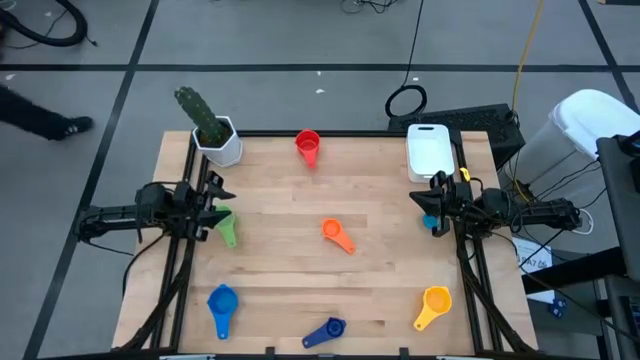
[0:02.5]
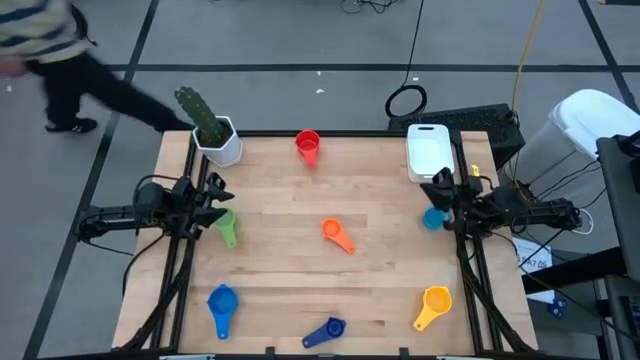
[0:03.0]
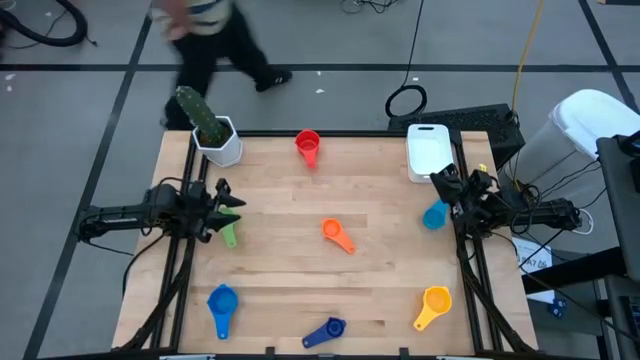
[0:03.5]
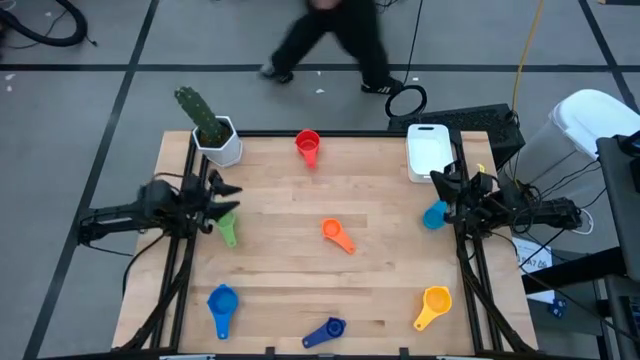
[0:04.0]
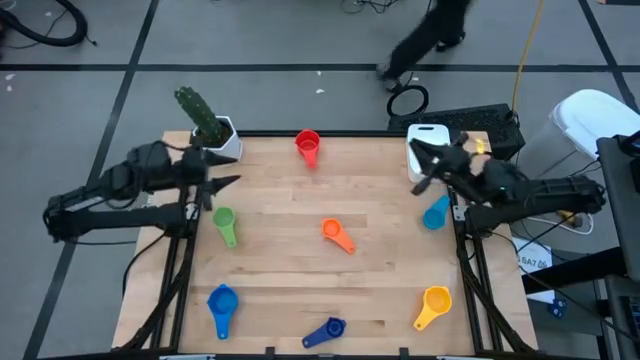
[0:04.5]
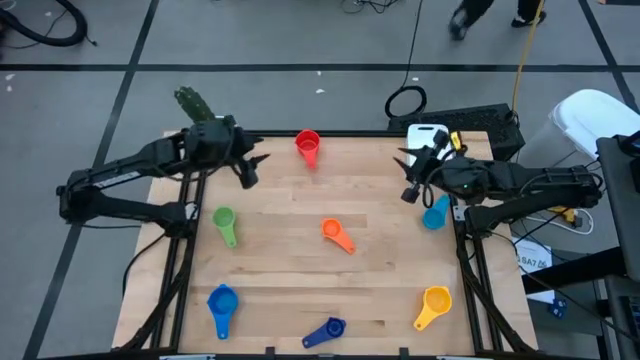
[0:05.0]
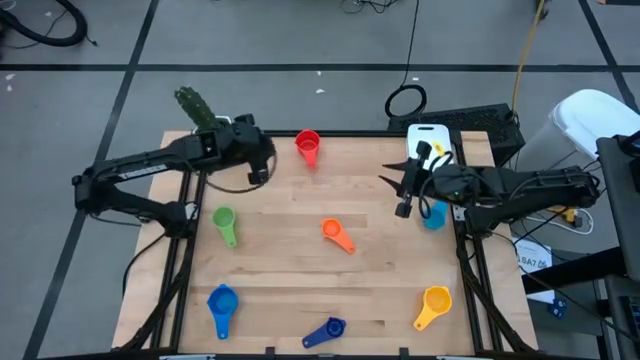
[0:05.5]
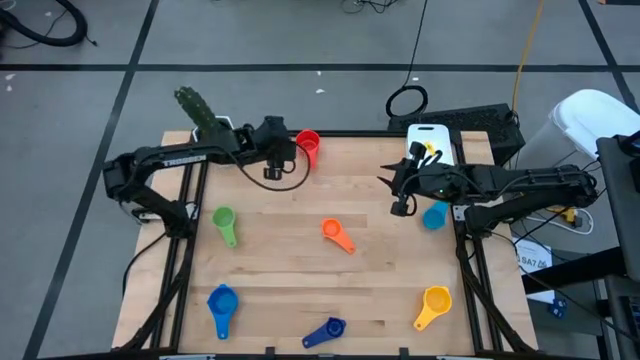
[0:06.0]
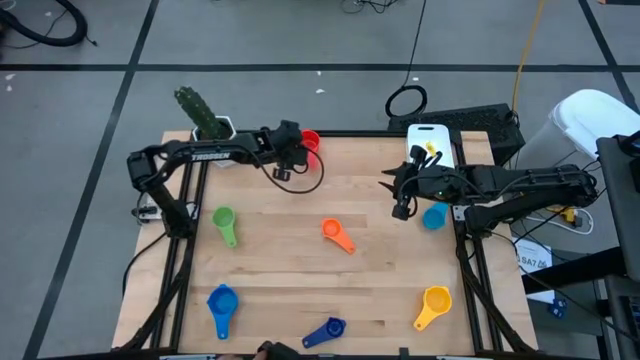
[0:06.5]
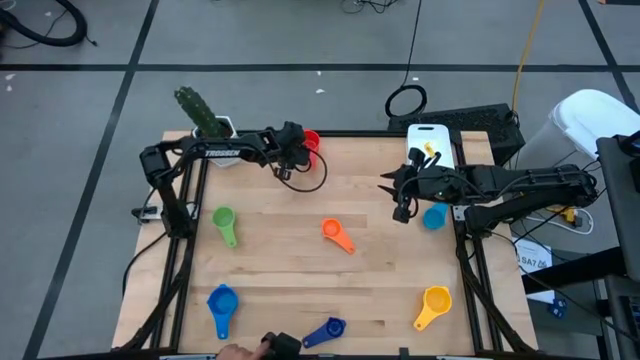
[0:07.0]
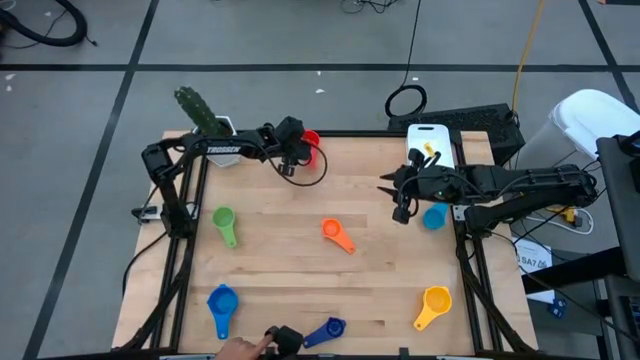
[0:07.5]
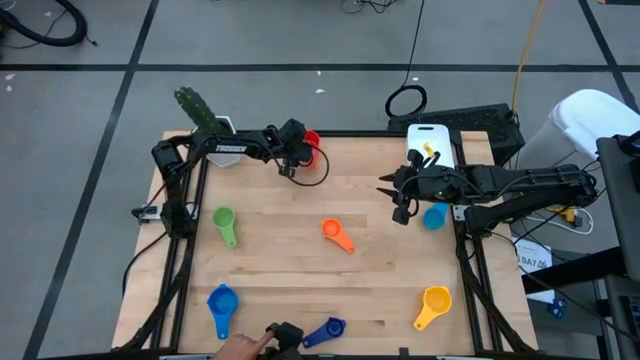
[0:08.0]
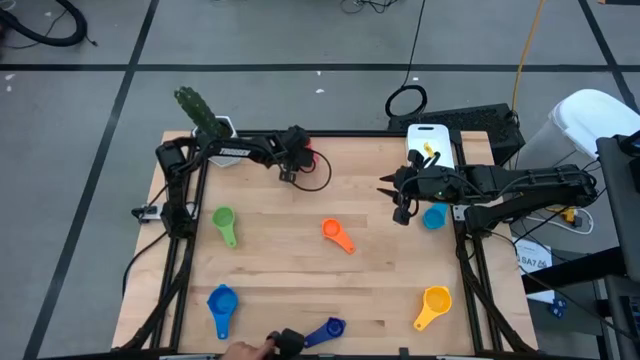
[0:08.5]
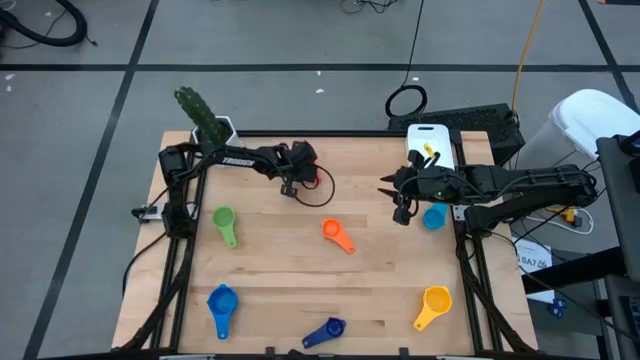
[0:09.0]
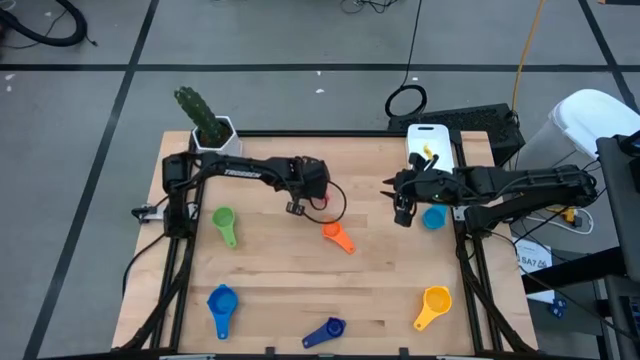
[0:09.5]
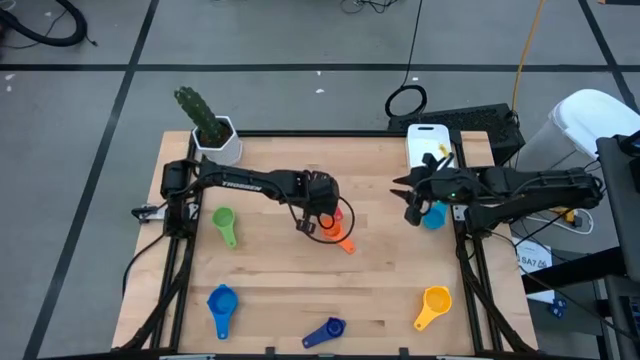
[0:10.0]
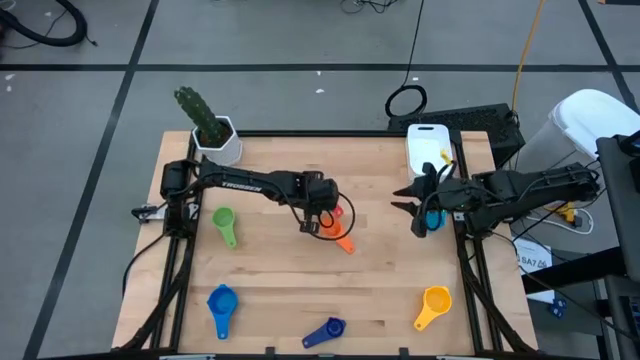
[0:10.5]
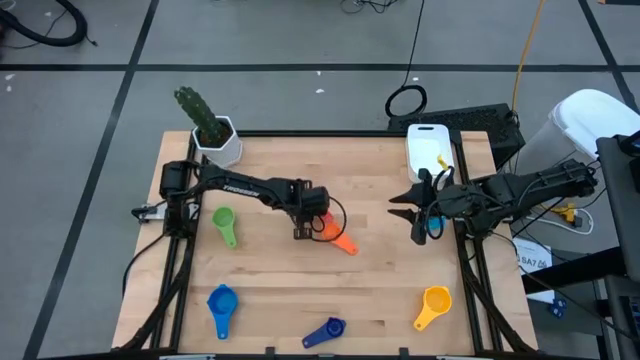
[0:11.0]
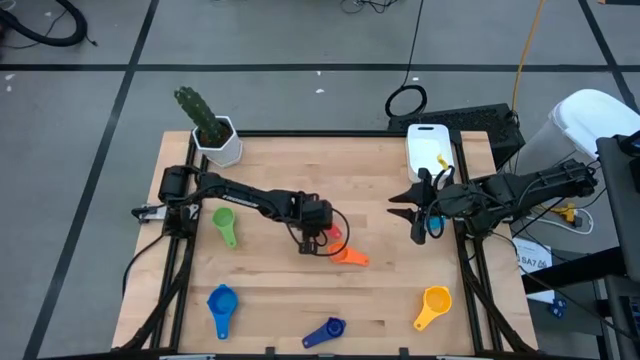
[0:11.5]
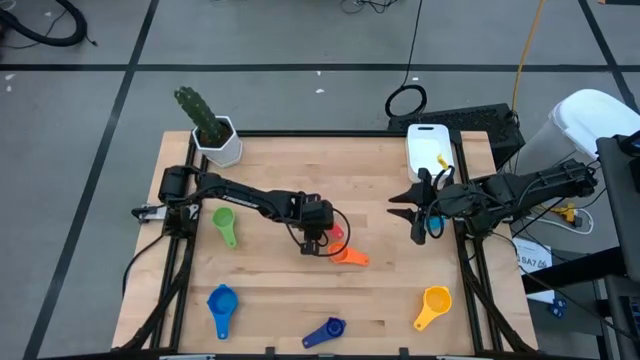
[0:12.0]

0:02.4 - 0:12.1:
Task: Nest measuring cups in basket
Move the red measuring cup to the center of the table

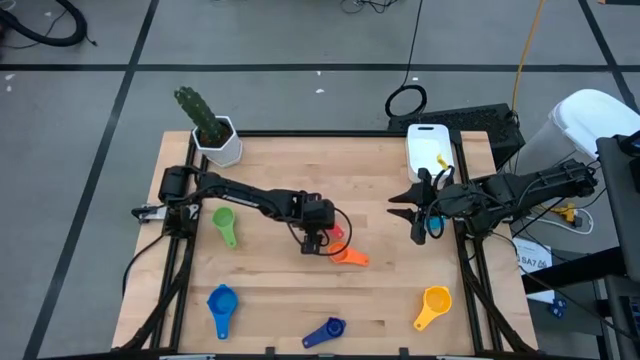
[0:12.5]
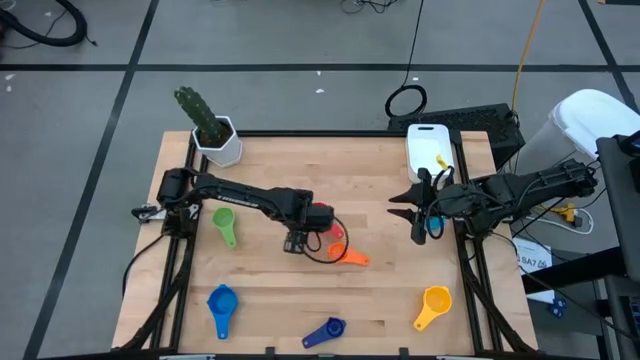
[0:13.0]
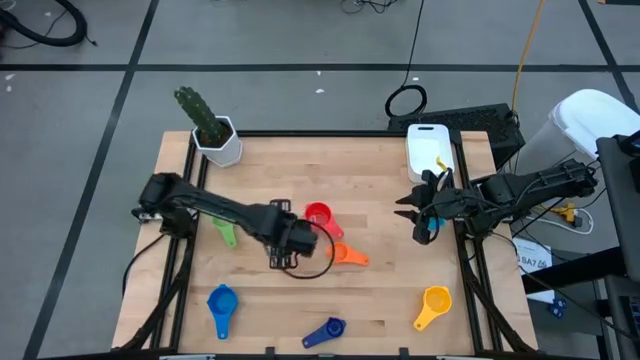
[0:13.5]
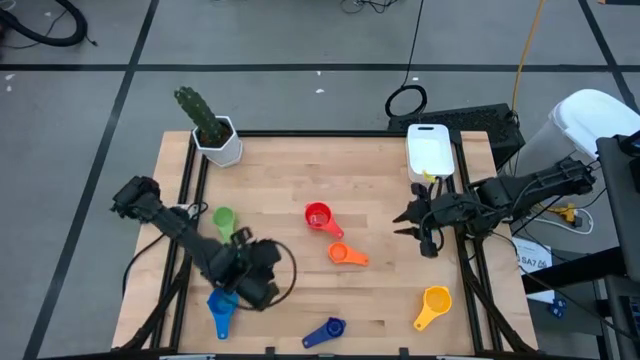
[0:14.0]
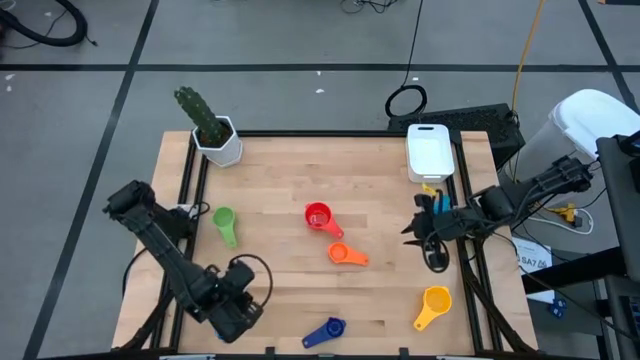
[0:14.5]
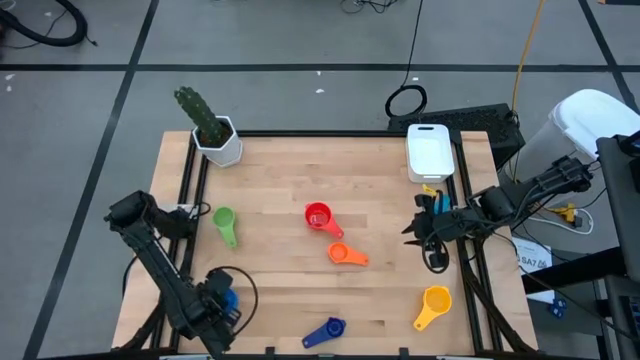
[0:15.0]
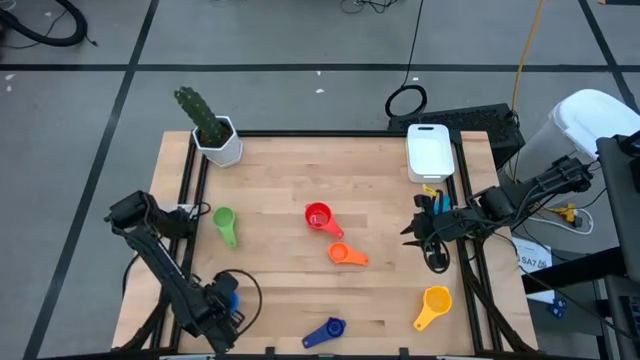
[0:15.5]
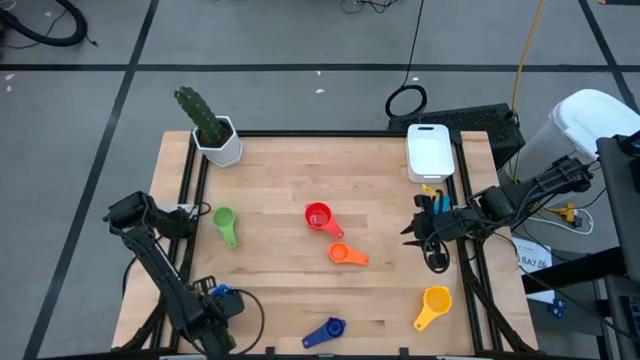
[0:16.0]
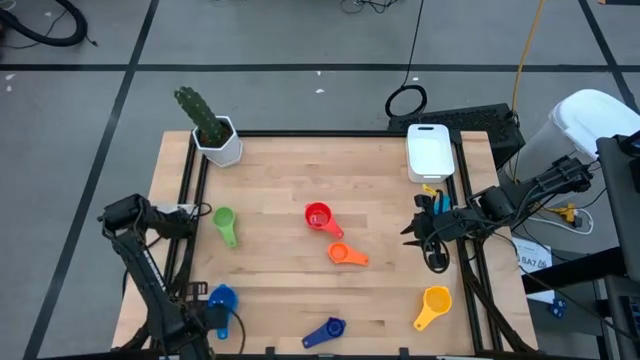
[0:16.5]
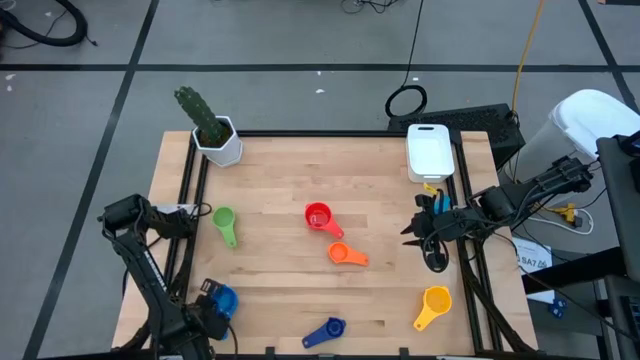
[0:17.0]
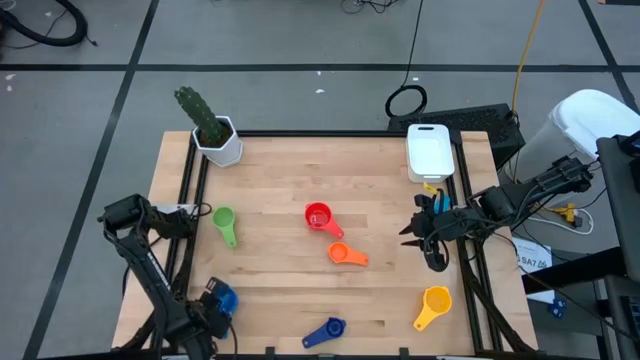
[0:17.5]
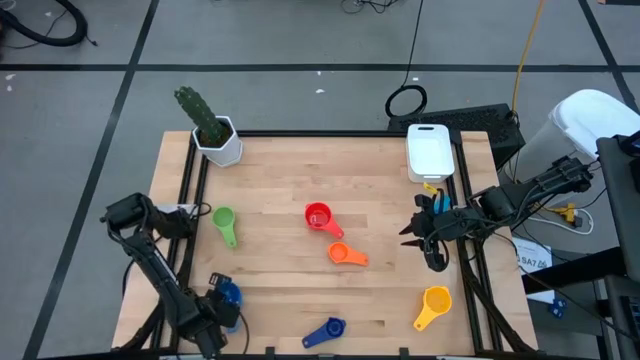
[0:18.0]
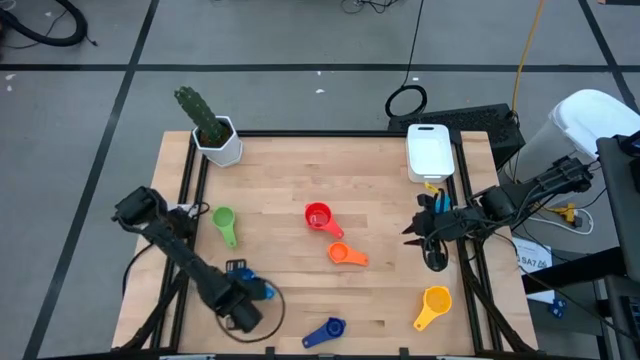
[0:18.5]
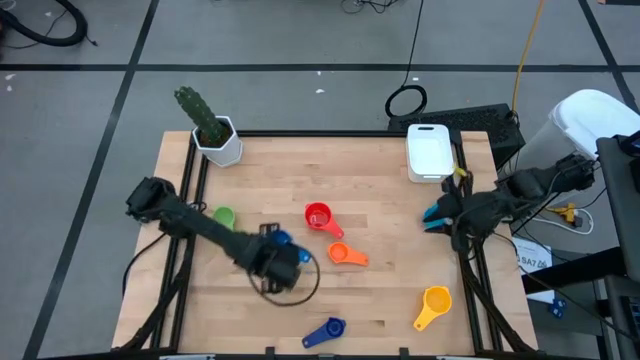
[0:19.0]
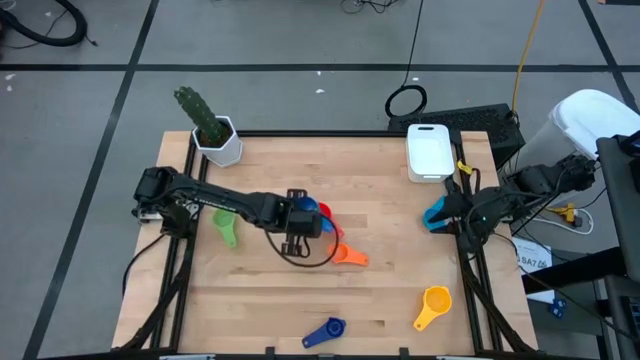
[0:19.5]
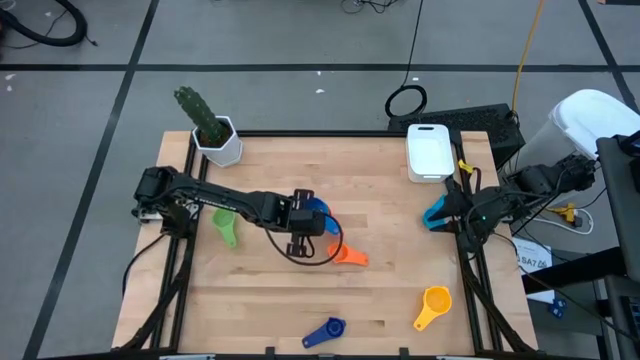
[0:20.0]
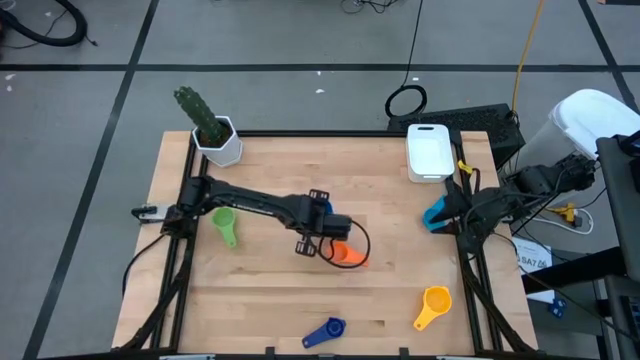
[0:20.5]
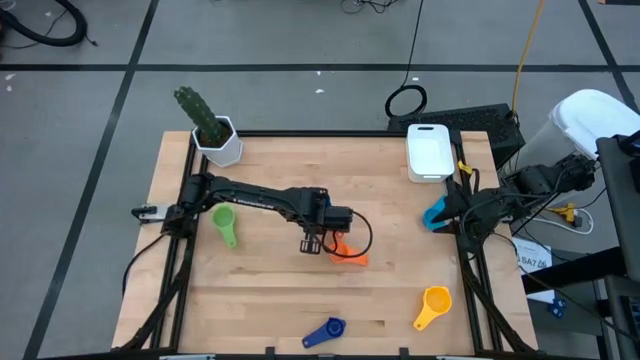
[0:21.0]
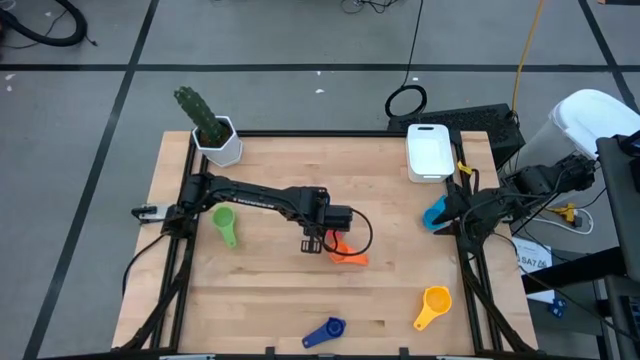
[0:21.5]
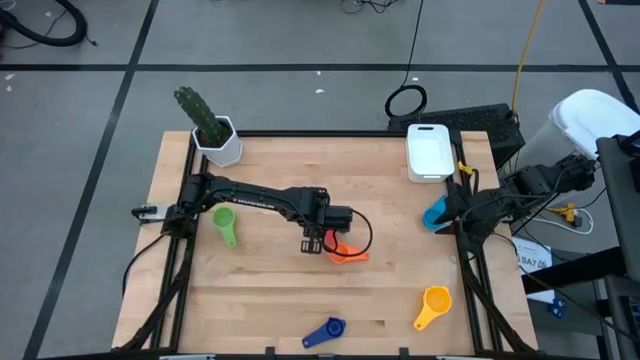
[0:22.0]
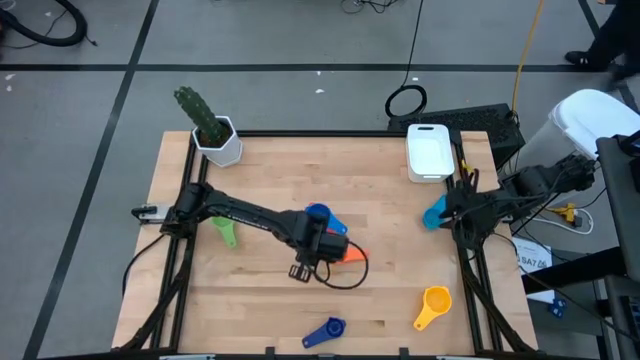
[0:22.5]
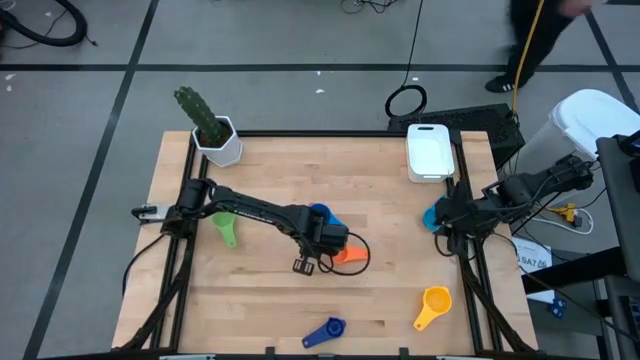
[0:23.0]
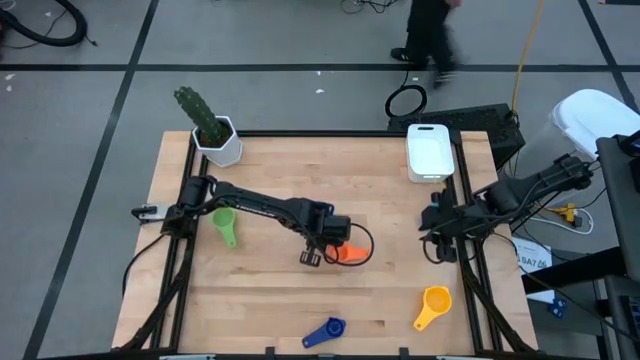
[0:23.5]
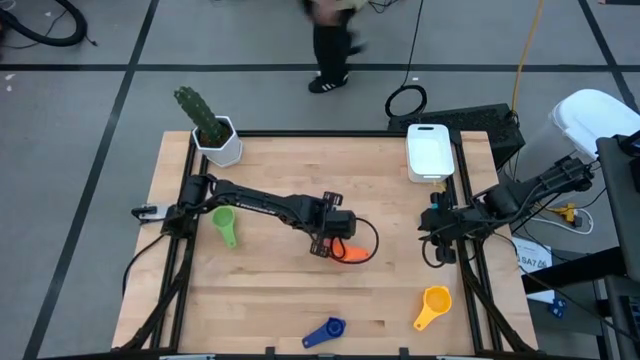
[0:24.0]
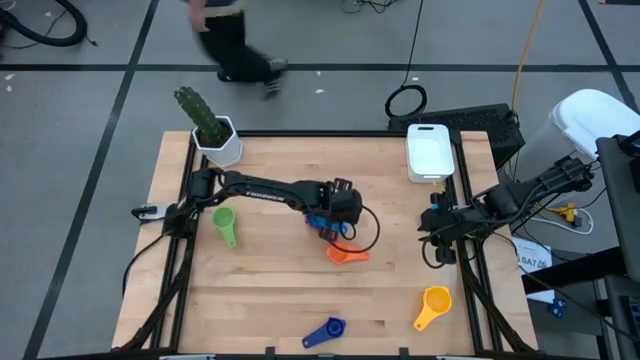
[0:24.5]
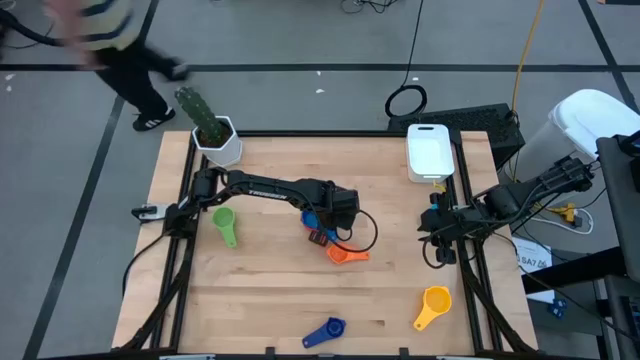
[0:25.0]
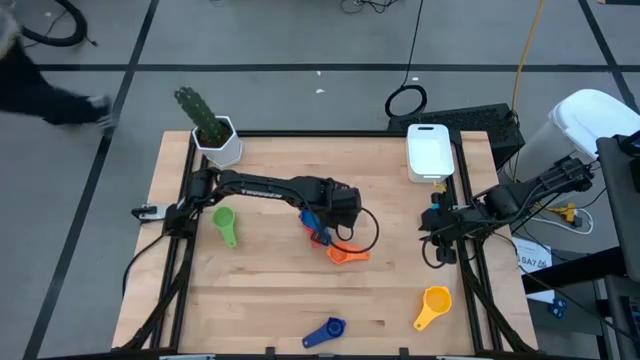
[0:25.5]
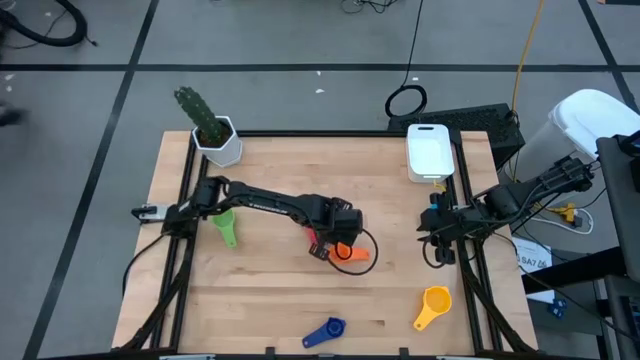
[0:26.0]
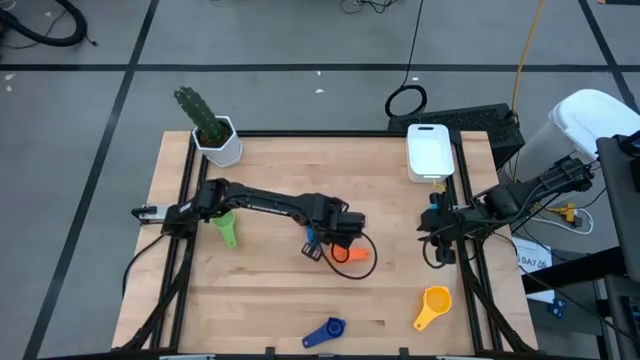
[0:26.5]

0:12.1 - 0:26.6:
Stack the blue measuring cup on top of the red measuring cup
